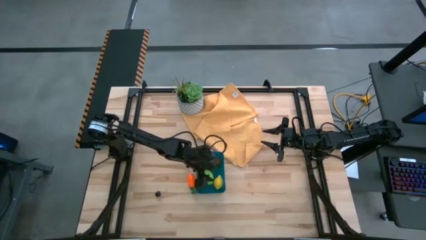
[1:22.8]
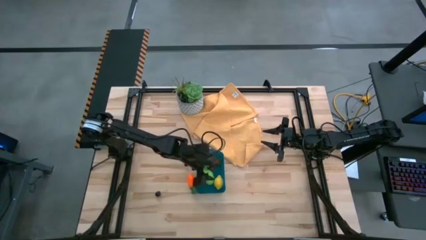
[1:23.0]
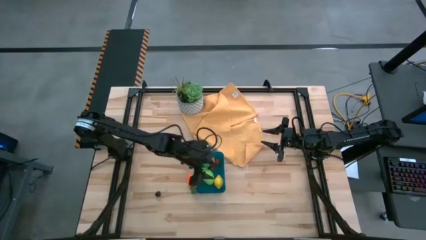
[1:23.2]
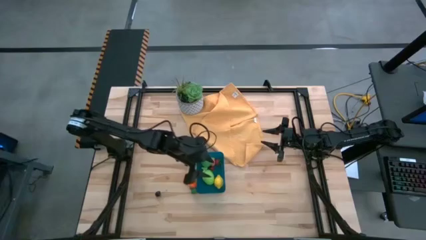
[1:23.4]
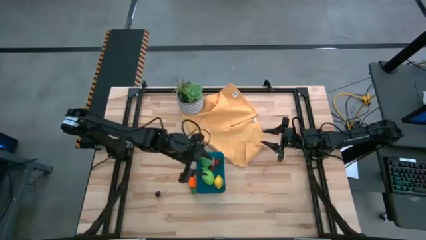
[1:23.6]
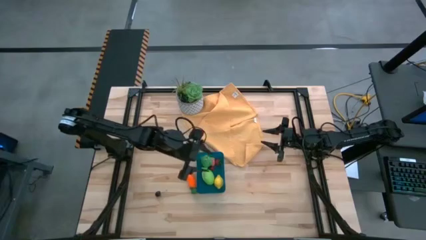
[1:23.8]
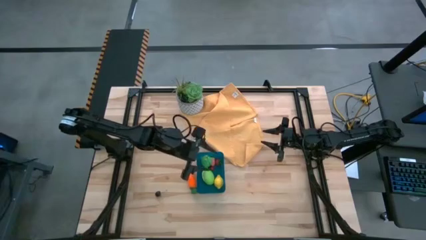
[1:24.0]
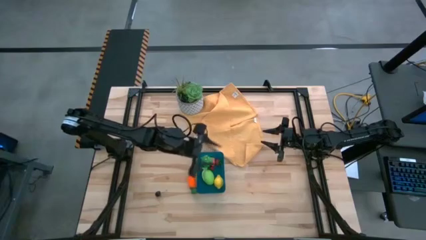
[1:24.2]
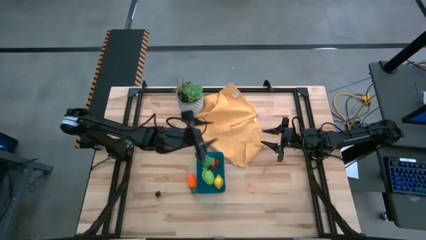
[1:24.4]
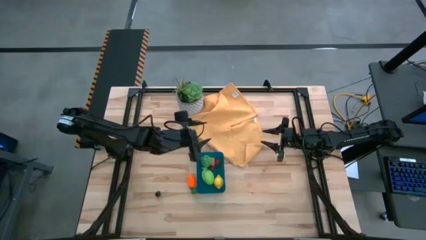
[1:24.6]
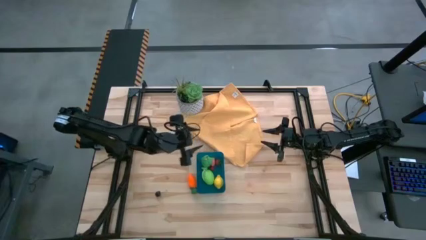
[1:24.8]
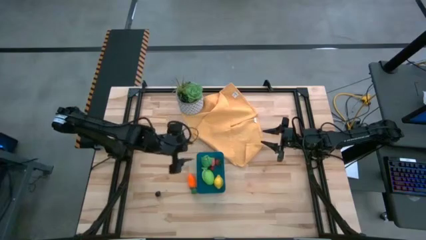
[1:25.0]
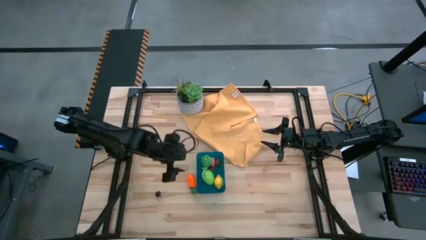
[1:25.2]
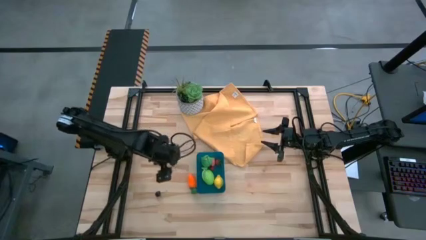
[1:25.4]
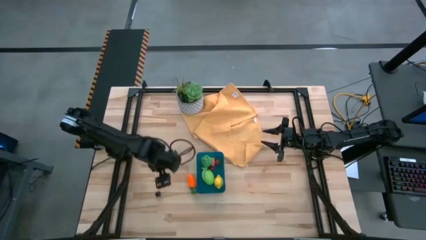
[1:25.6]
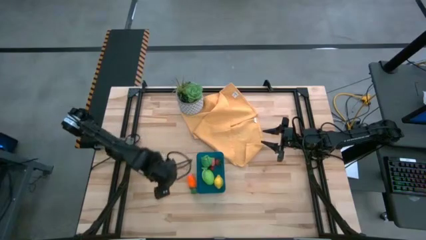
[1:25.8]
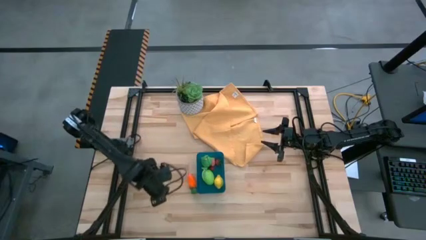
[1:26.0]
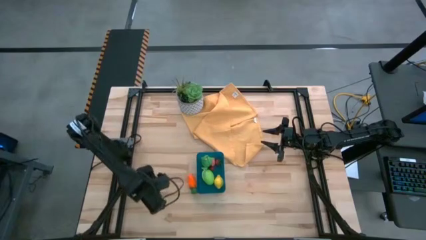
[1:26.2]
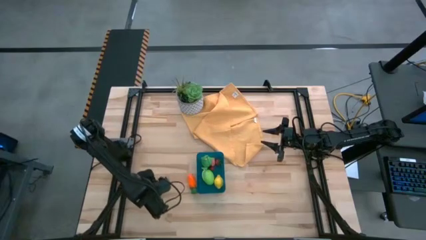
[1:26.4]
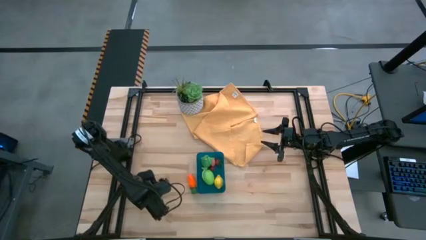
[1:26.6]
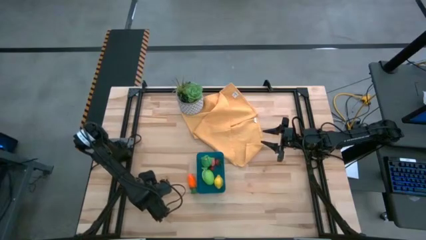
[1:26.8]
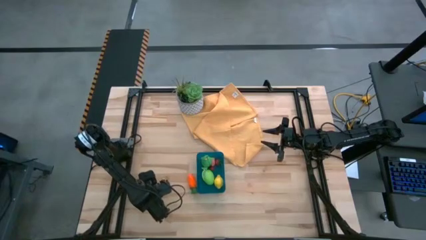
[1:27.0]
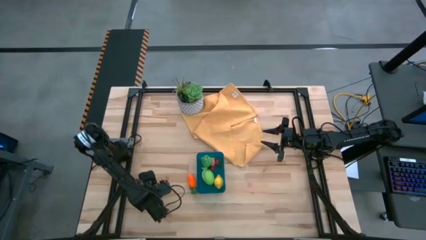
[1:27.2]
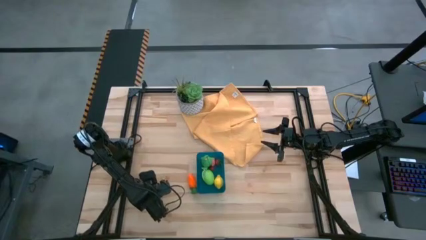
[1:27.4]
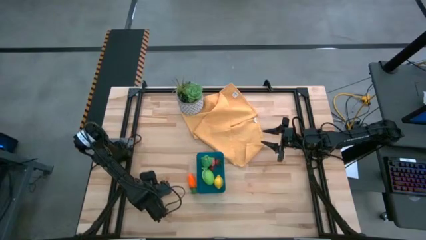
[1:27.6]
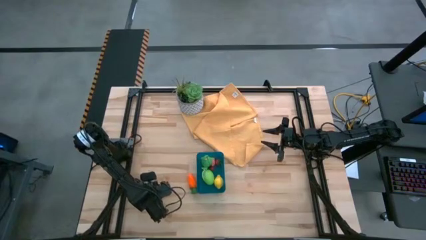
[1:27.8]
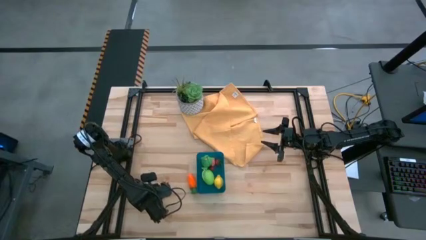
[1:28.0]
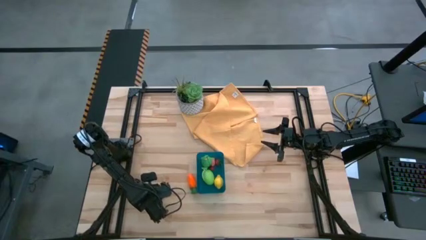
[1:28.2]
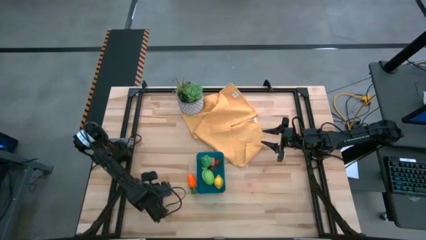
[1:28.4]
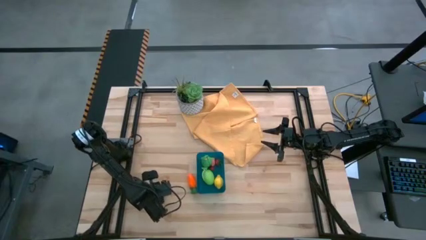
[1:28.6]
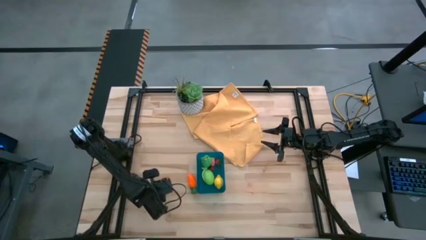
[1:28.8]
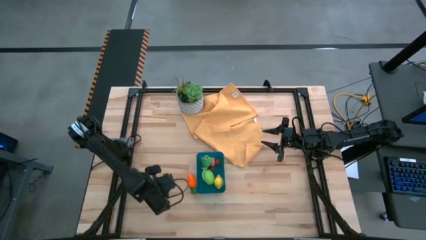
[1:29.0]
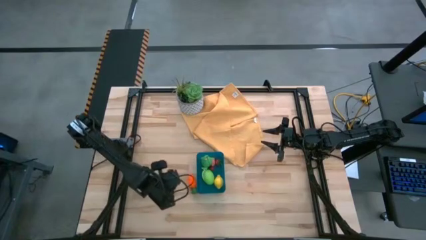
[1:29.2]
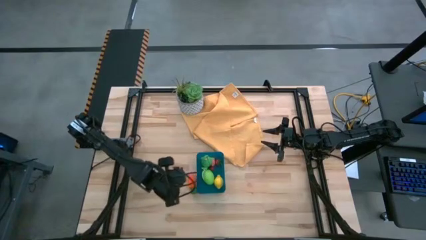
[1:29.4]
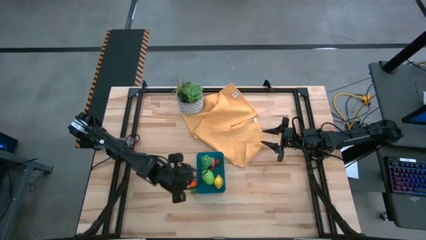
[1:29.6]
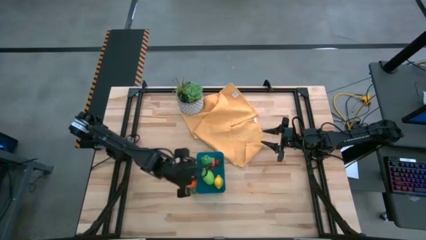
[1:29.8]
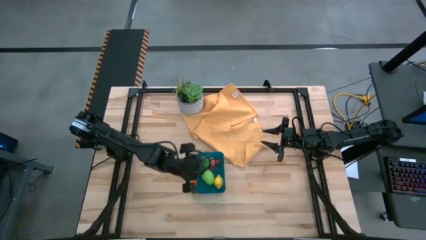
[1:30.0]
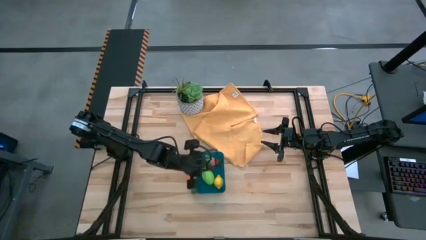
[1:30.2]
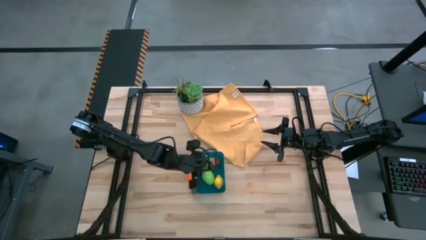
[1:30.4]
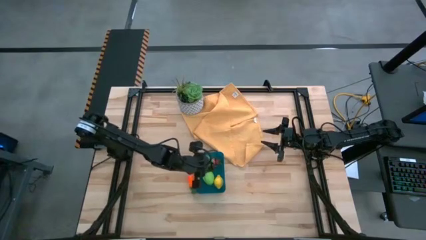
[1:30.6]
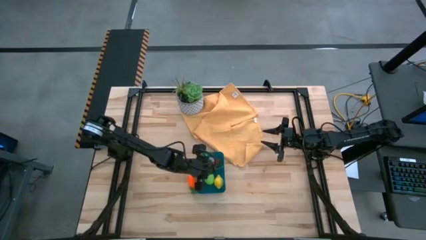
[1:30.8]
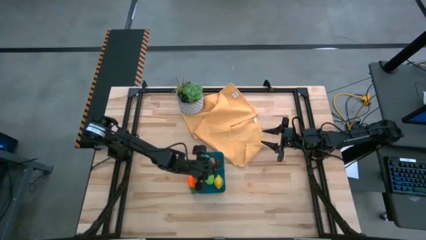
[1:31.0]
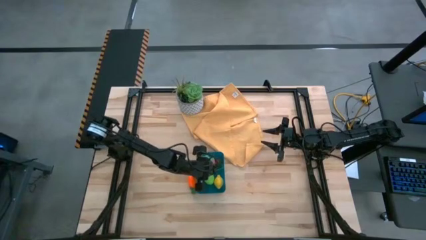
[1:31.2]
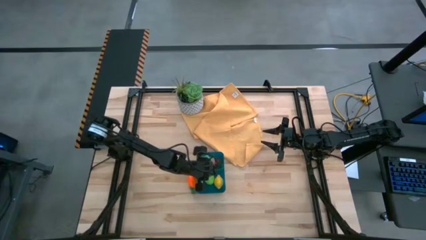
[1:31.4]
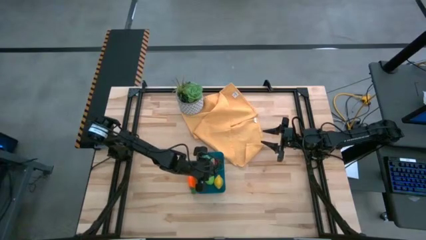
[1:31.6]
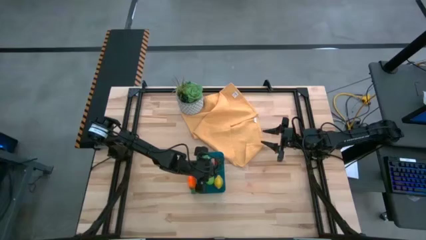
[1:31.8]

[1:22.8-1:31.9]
Task: Pick and placing Produce into tupperware
Put the black cherry into the bin

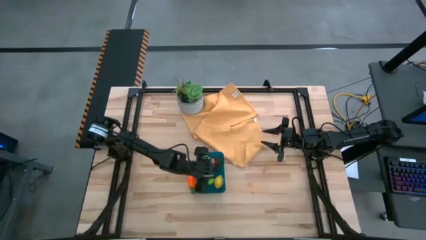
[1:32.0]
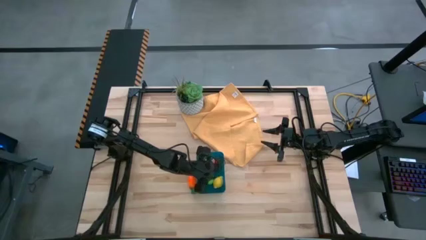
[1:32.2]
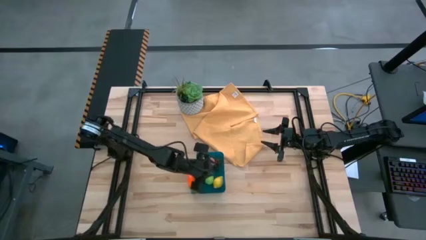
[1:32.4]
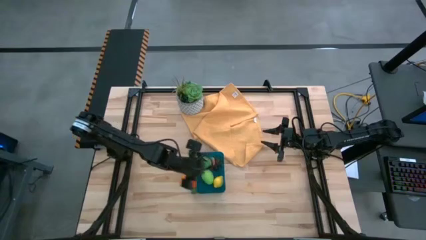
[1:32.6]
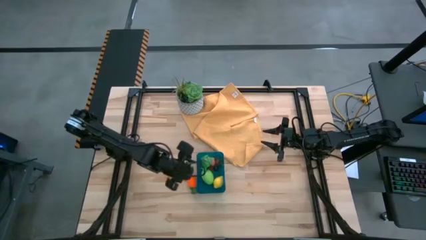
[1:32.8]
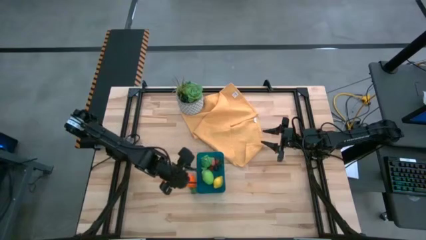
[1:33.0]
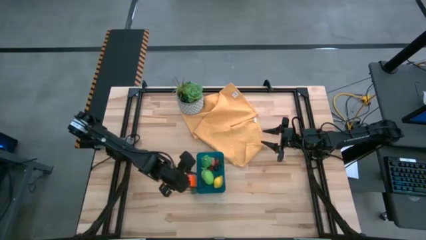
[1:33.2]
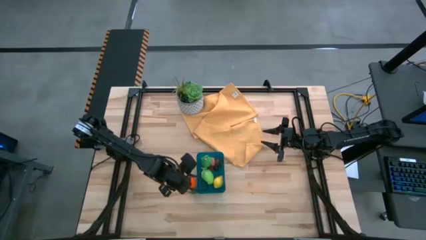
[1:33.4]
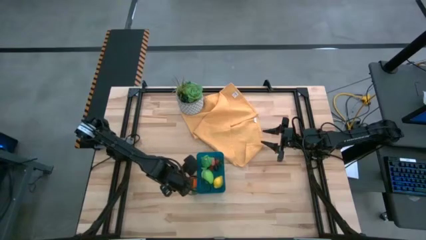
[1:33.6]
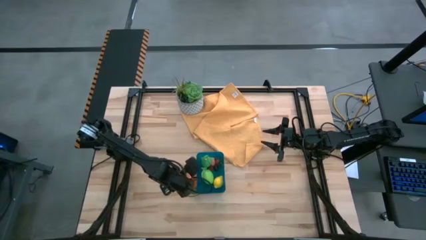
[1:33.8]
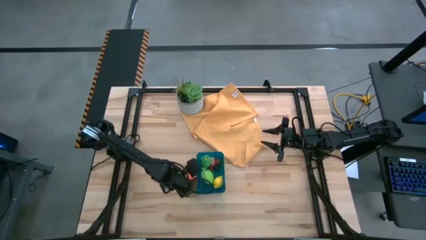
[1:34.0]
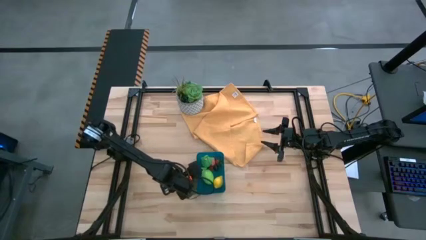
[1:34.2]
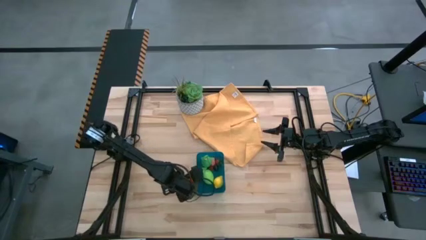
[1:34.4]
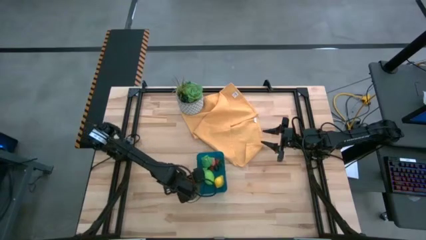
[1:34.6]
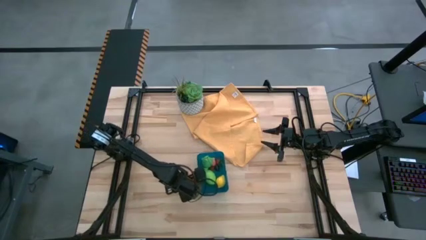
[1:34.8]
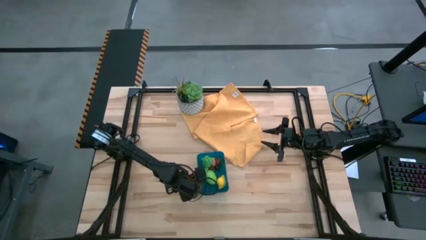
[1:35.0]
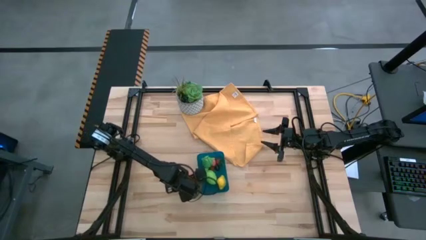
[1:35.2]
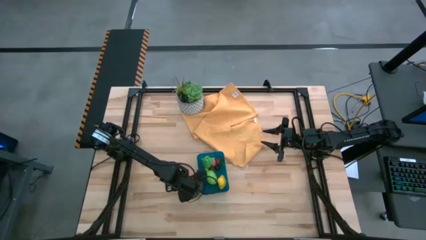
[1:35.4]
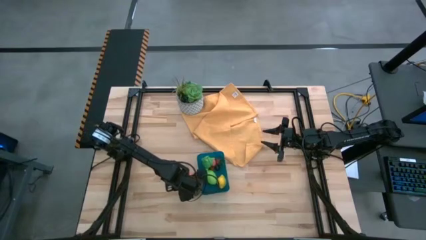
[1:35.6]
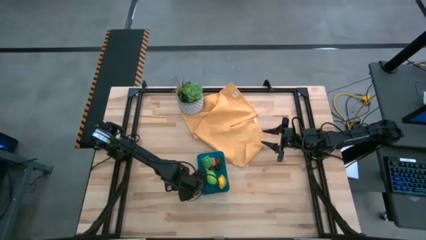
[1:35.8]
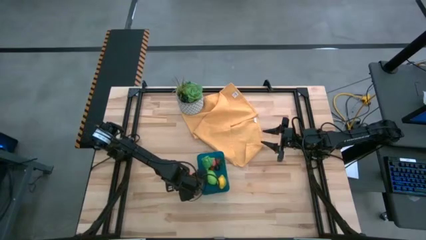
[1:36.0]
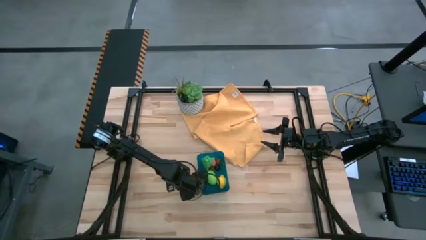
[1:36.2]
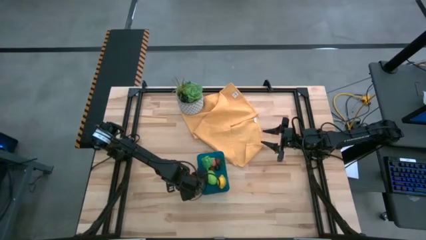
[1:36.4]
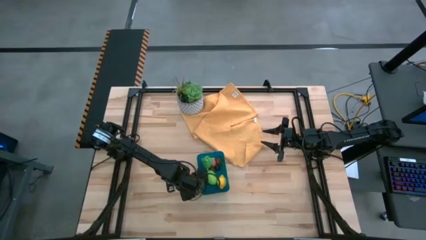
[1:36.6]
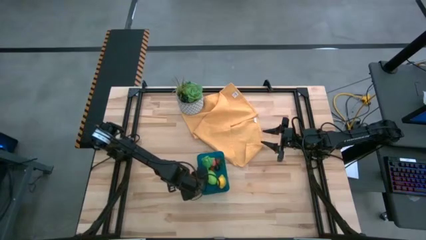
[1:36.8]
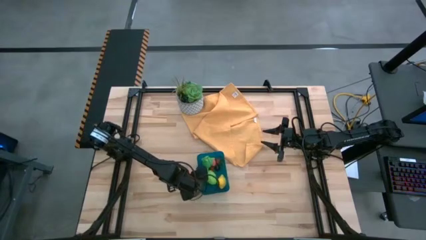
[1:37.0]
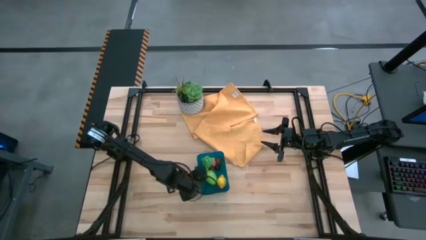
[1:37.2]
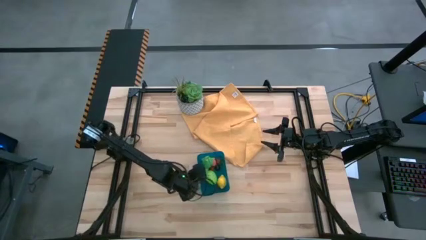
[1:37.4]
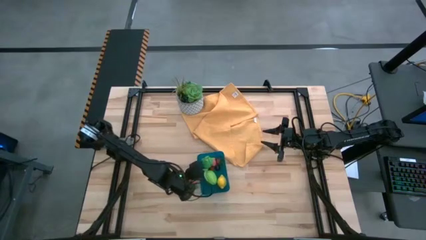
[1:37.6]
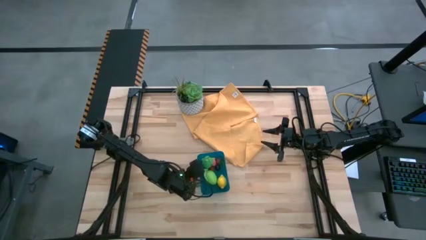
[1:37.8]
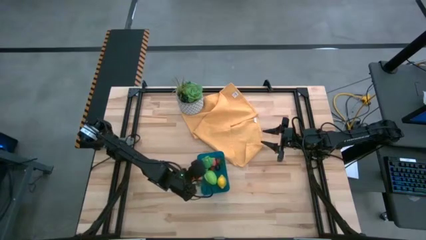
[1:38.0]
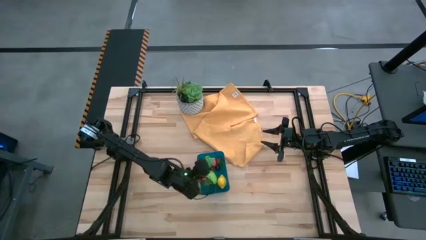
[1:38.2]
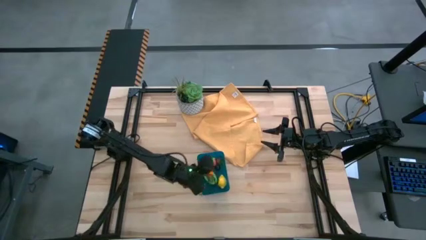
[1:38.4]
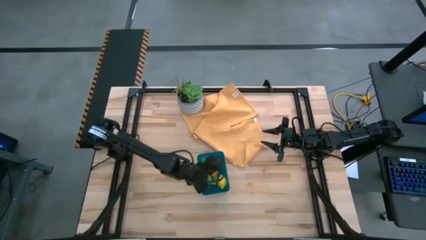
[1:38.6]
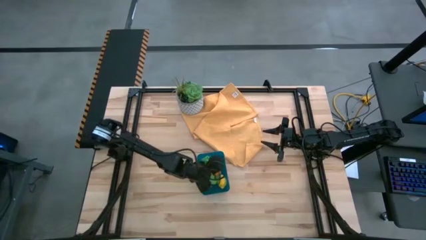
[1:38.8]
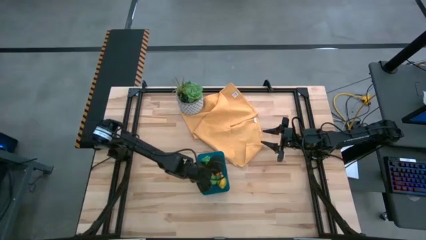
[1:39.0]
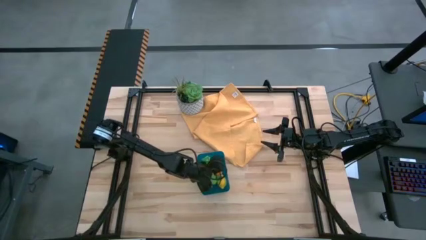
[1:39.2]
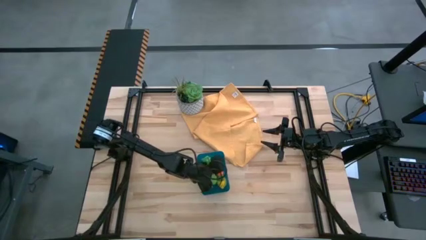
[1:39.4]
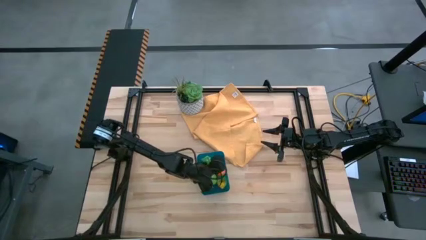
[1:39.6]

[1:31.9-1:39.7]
Put the carrot into the bin
